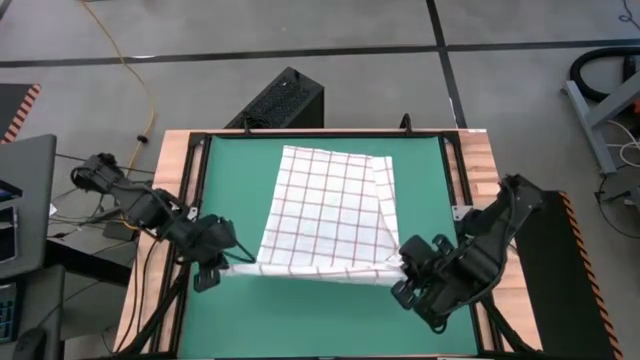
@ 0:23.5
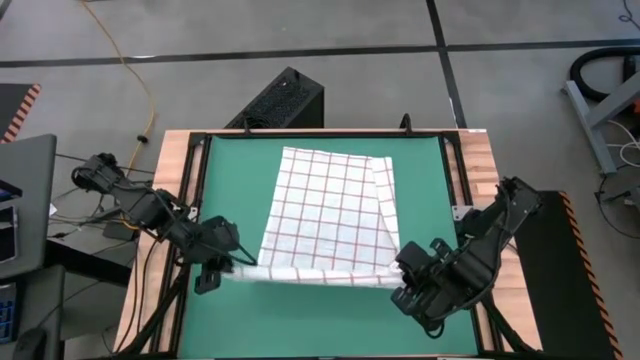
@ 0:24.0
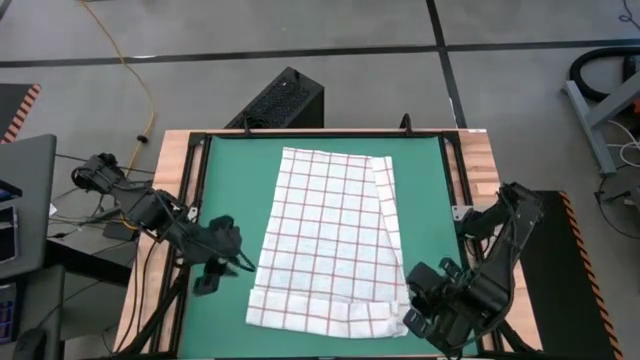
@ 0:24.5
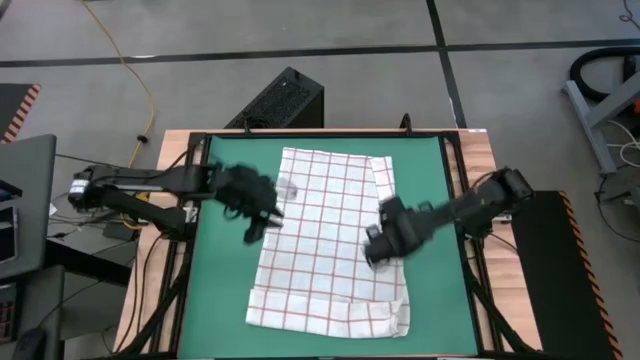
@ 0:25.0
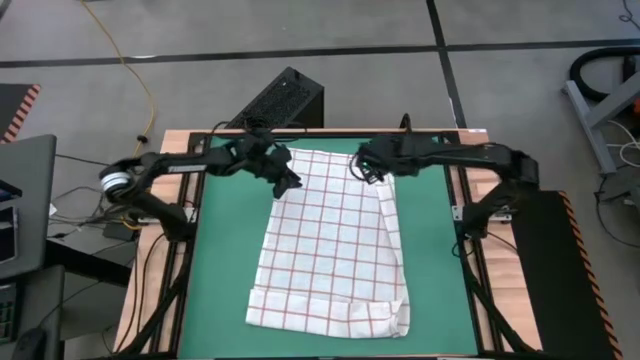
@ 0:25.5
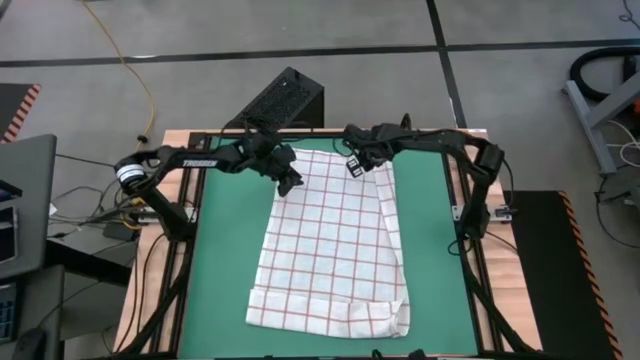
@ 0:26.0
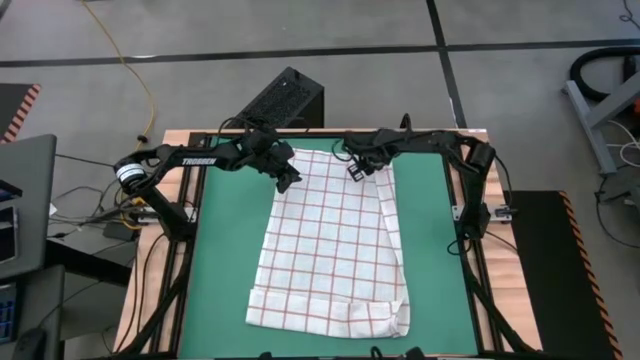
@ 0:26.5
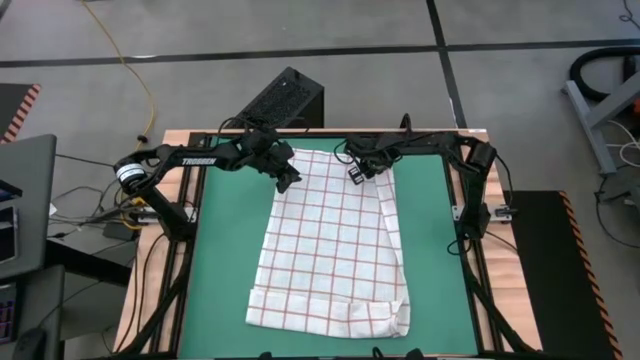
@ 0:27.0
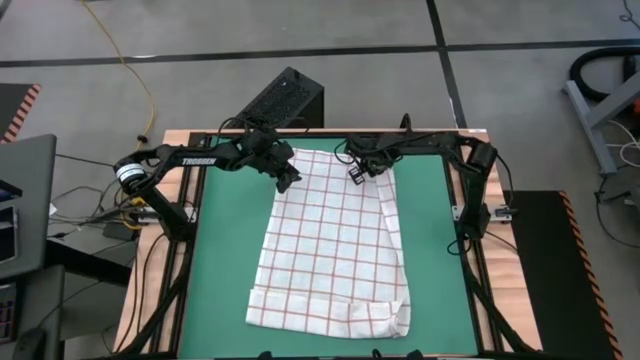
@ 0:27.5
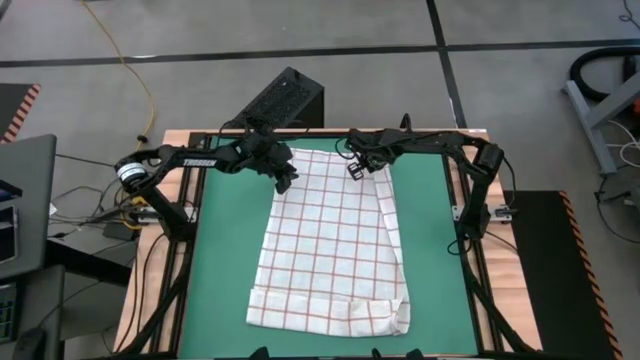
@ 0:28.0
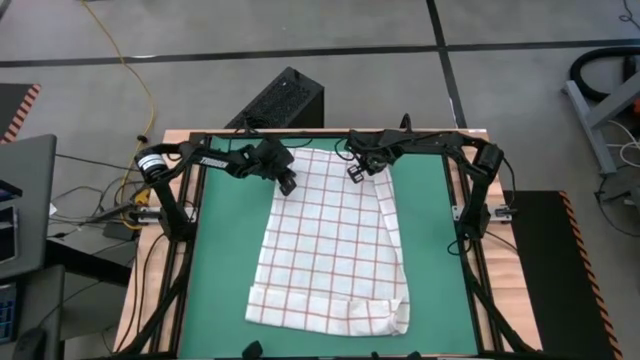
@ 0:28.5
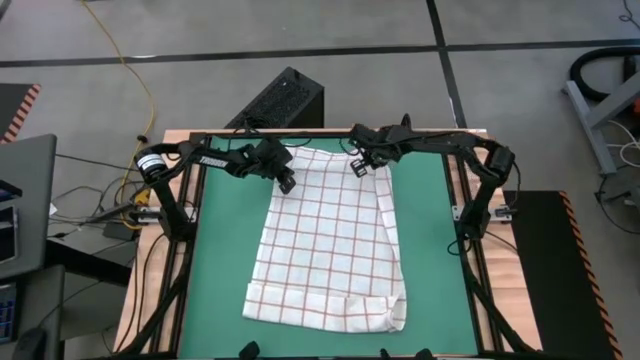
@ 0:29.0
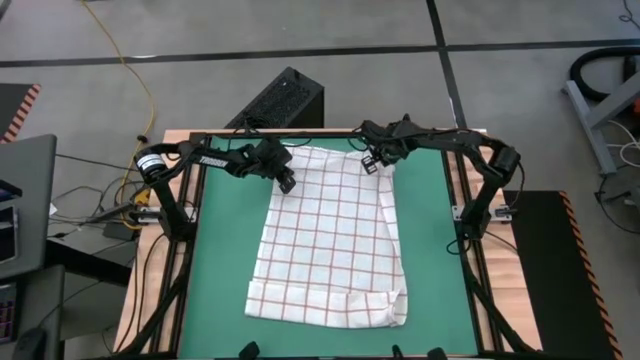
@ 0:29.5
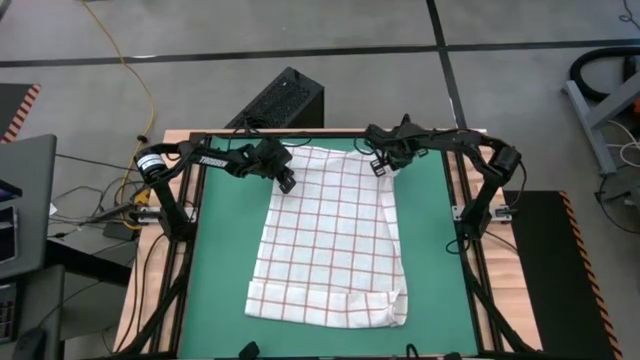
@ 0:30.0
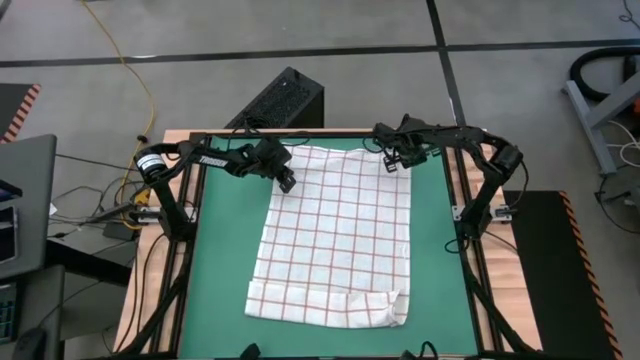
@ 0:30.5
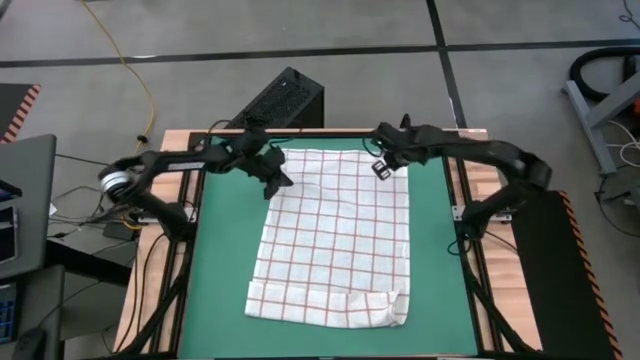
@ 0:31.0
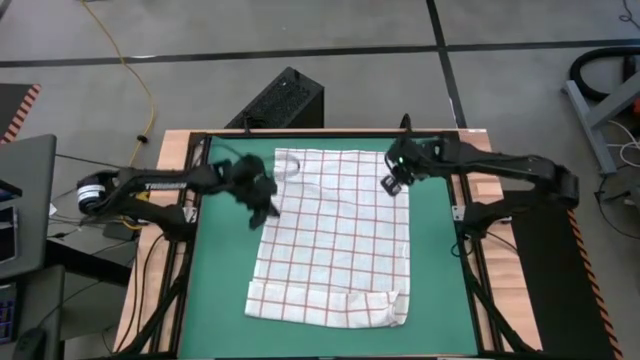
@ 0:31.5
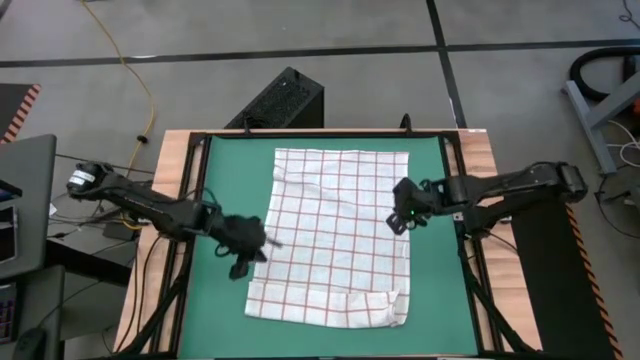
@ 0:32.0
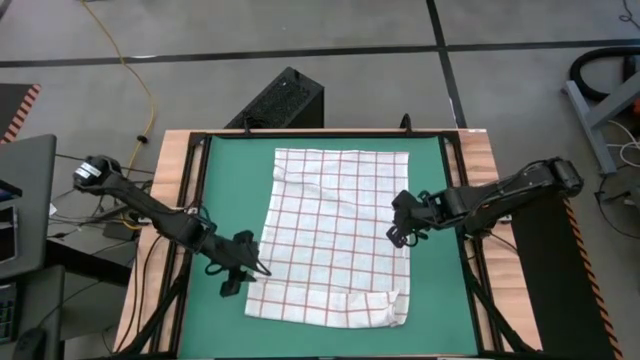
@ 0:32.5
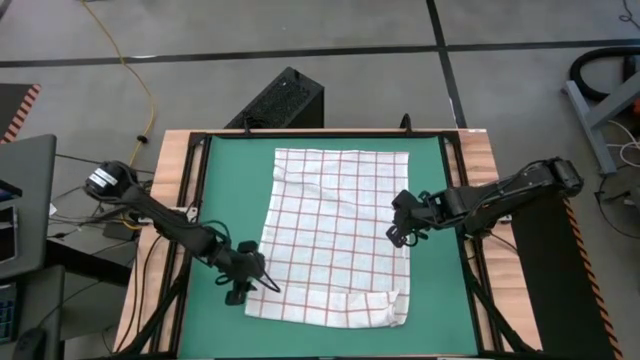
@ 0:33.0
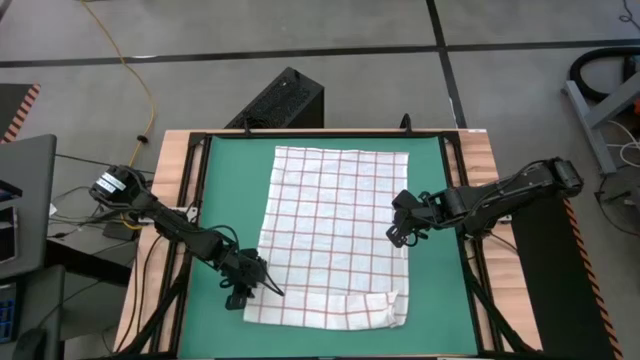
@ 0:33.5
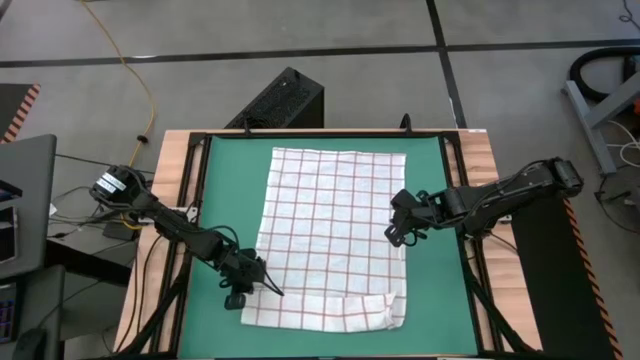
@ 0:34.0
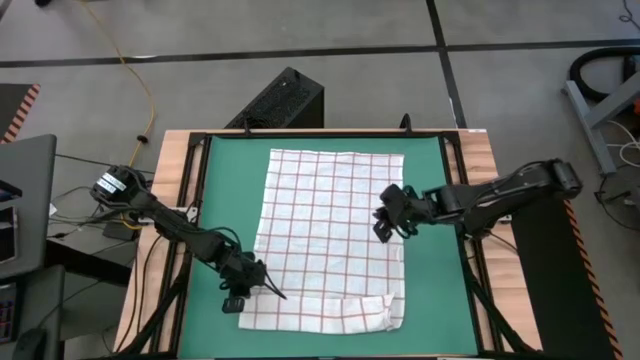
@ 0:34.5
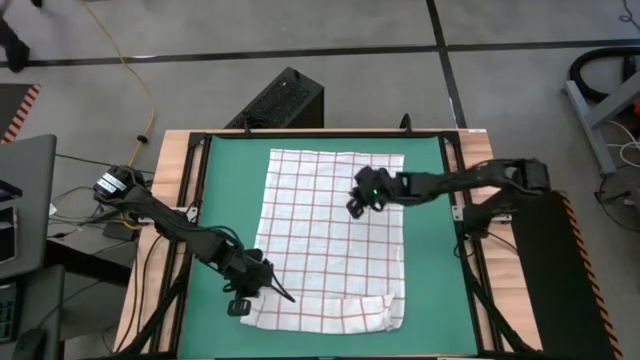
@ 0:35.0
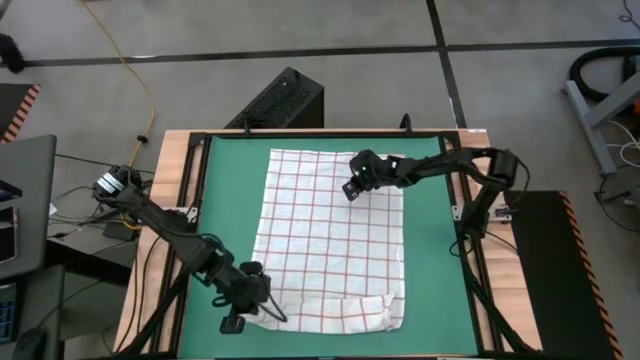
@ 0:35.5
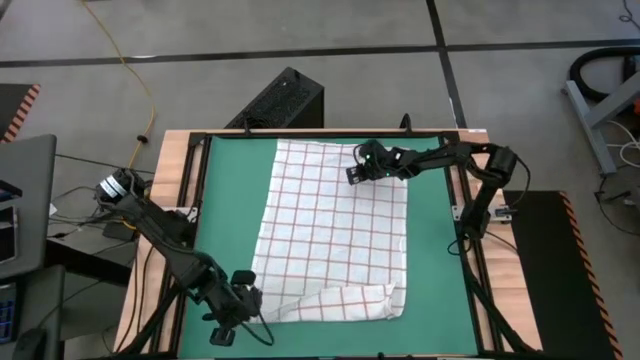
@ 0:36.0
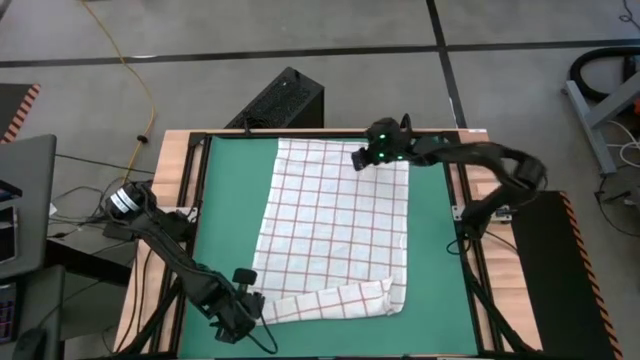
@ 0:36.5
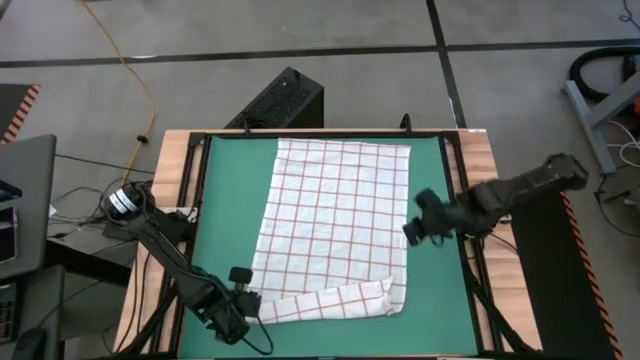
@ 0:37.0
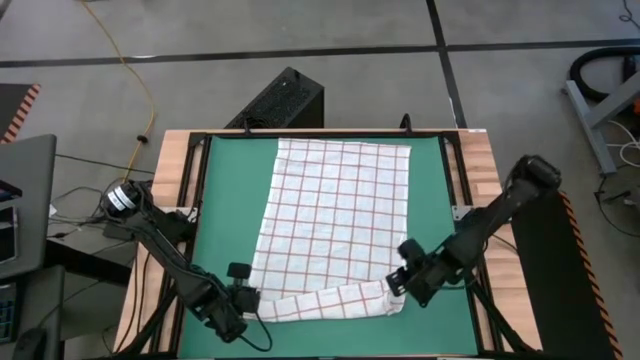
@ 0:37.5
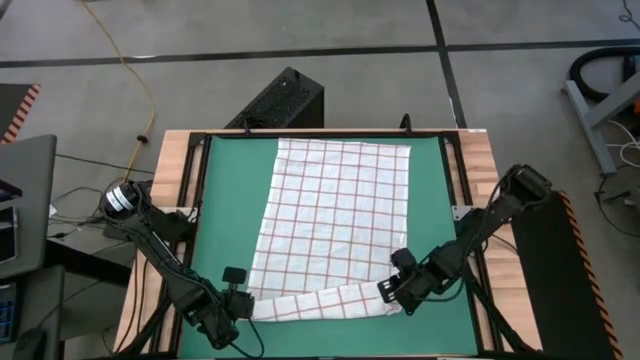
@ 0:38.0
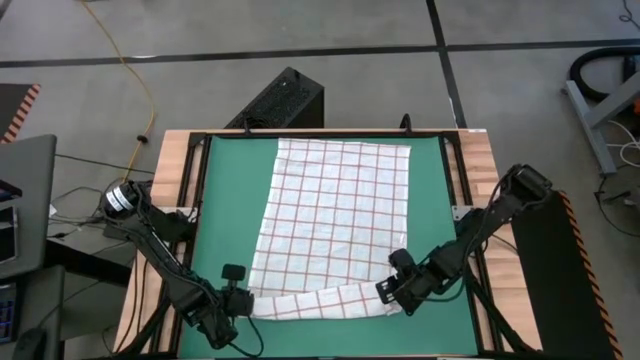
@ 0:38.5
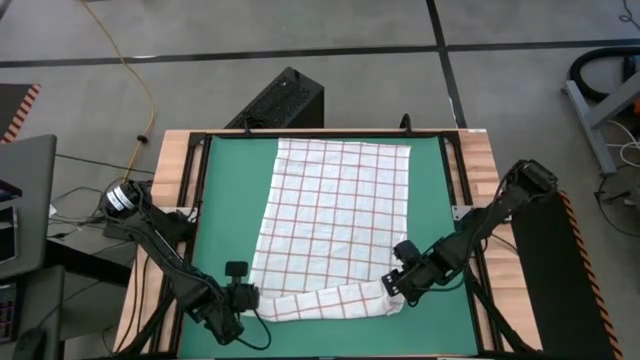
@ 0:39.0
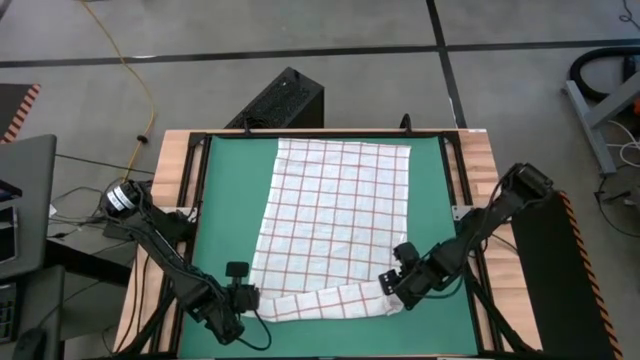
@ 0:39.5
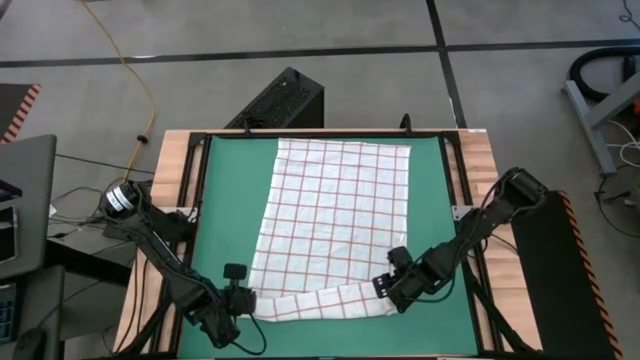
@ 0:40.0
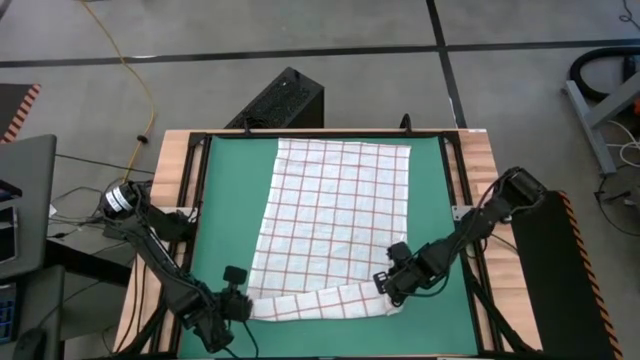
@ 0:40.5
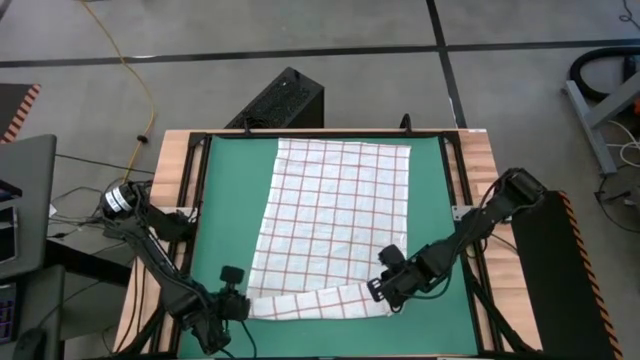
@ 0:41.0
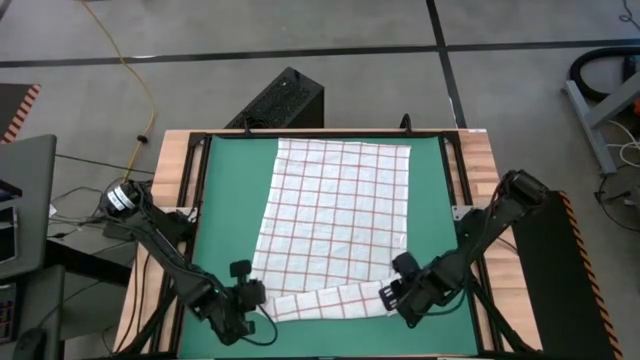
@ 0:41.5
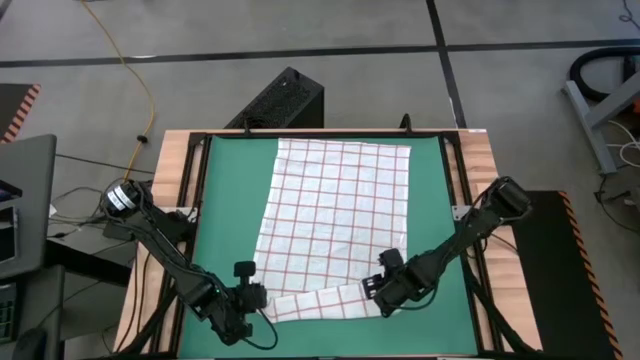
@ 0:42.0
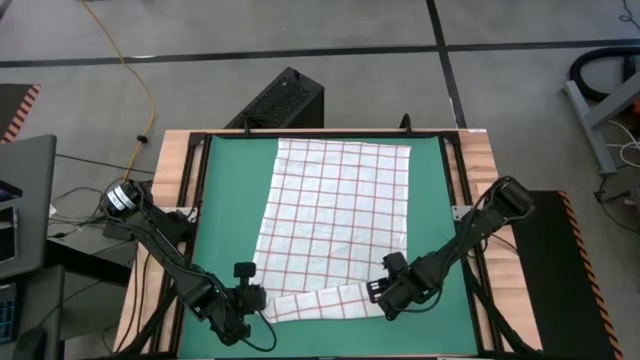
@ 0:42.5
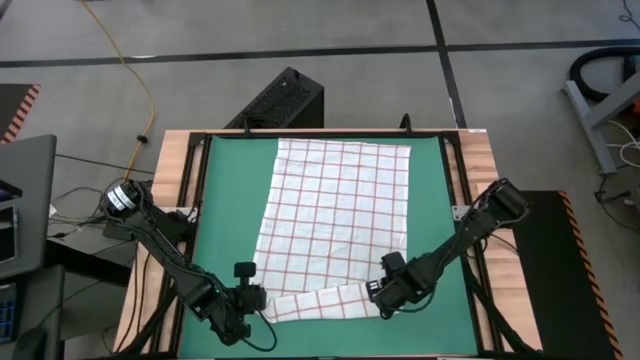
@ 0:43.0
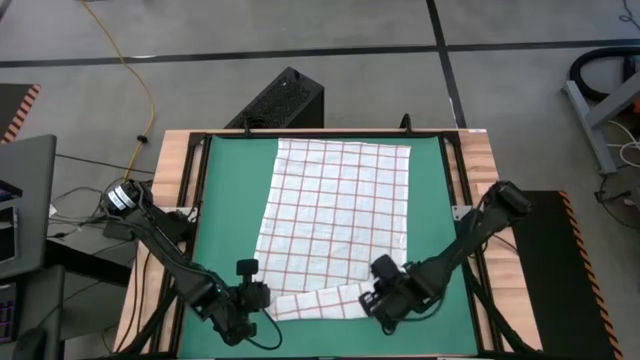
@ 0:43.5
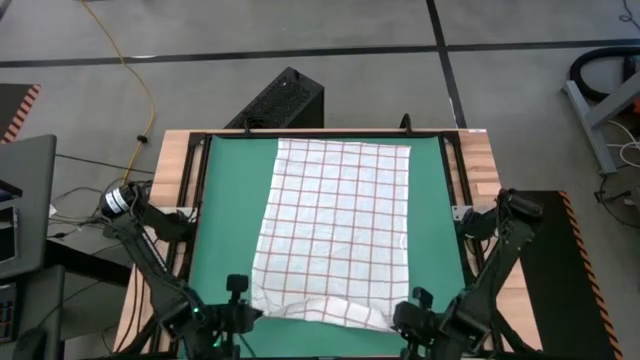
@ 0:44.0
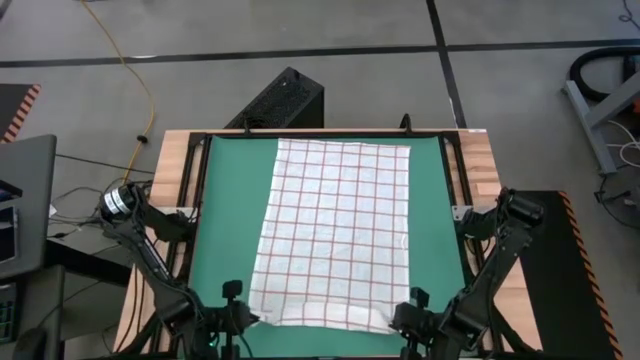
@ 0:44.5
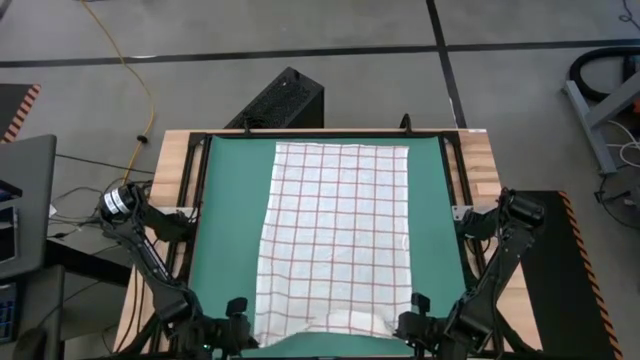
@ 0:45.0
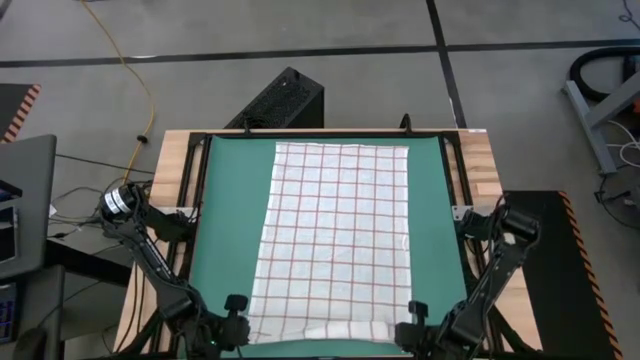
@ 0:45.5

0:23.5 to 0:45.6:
Task: Roll towel into tight, uniform cylinder
Roll the white patterned towel
